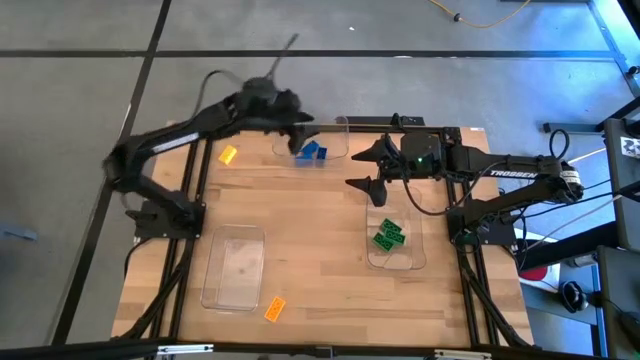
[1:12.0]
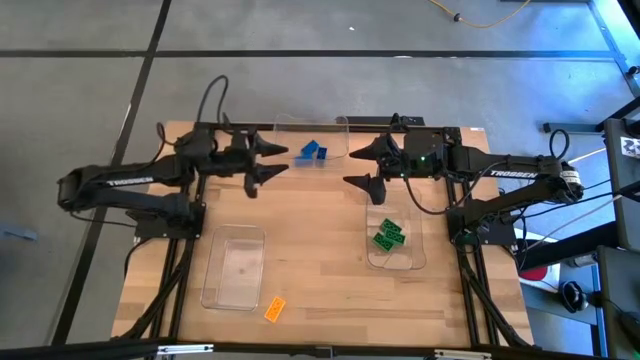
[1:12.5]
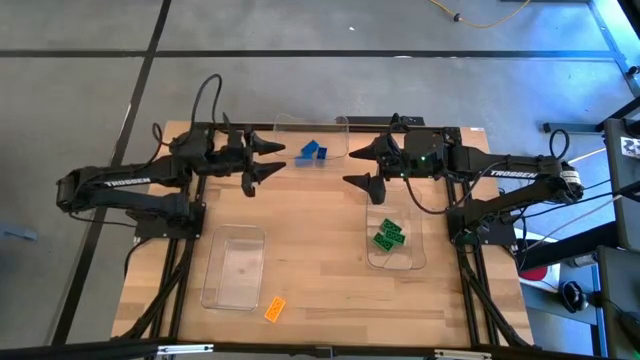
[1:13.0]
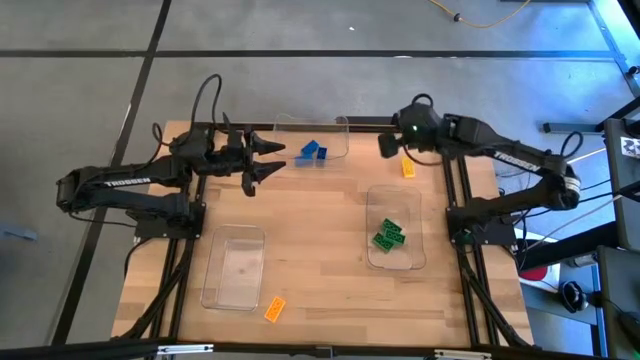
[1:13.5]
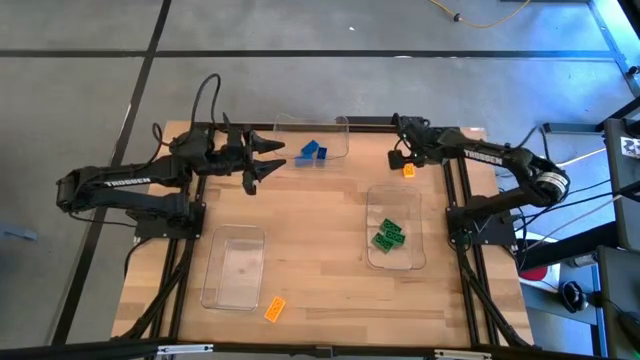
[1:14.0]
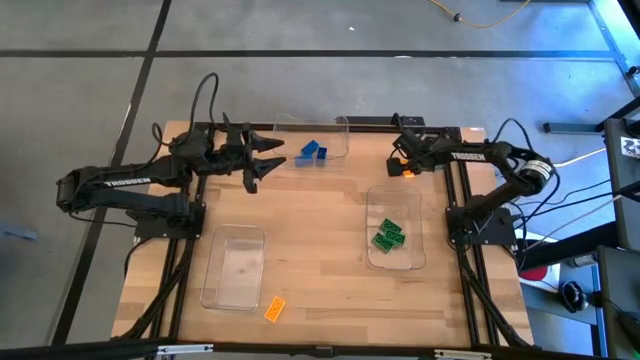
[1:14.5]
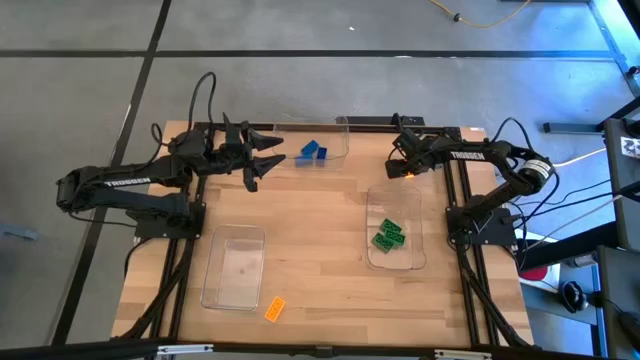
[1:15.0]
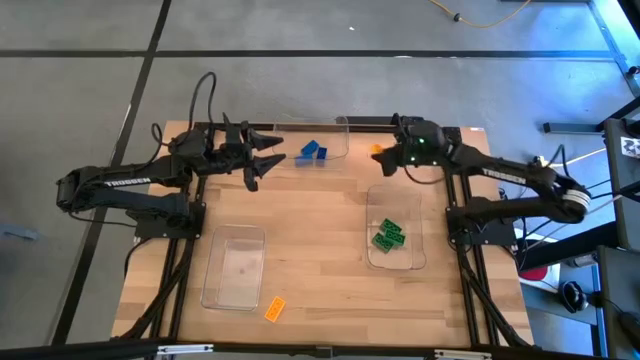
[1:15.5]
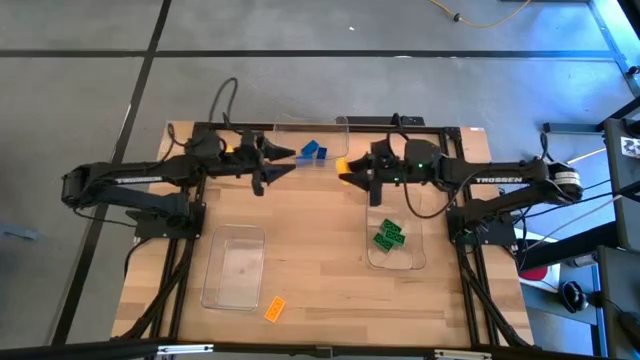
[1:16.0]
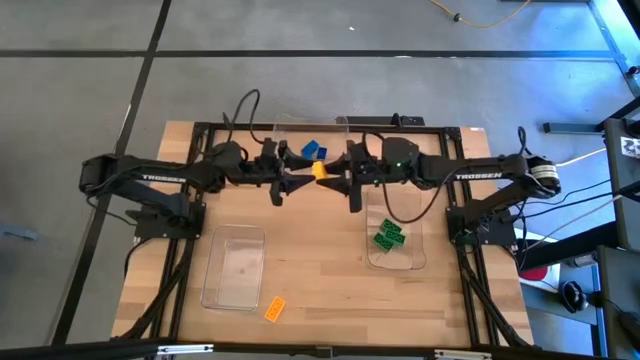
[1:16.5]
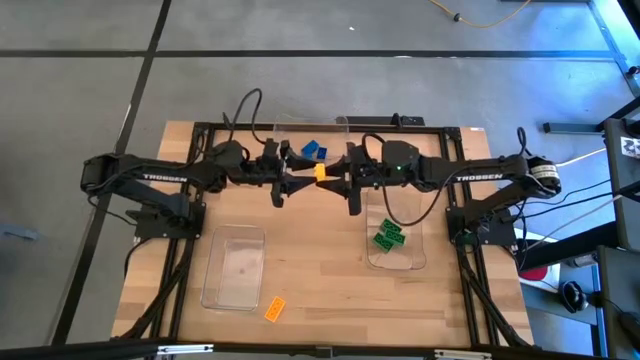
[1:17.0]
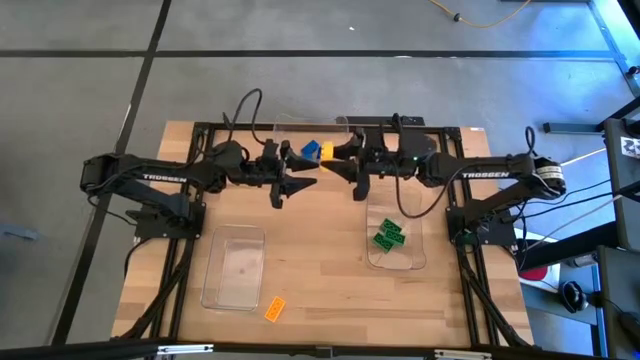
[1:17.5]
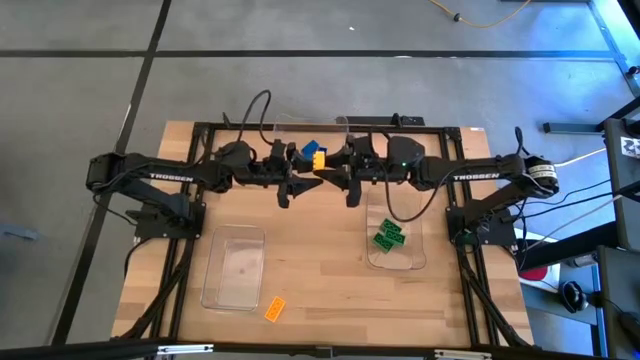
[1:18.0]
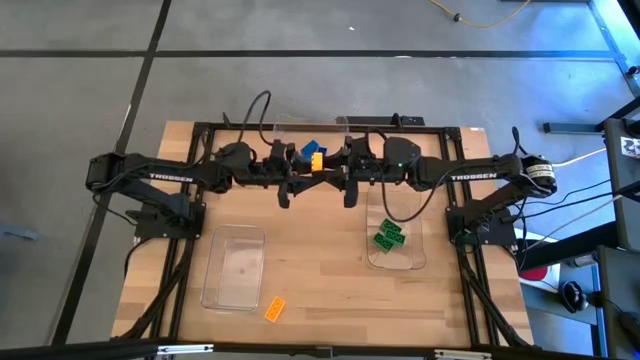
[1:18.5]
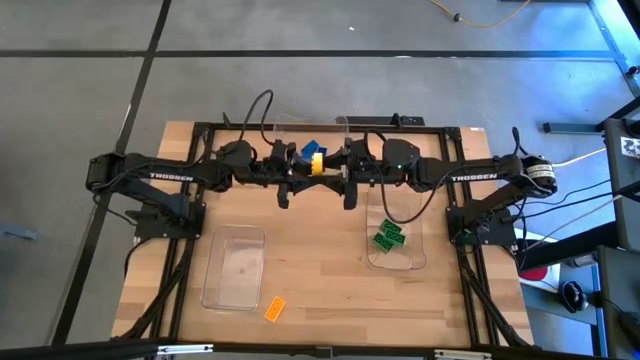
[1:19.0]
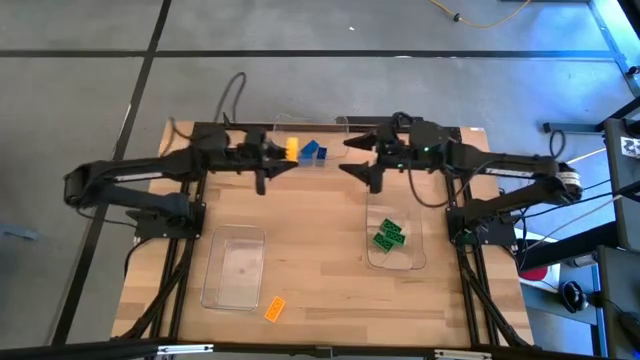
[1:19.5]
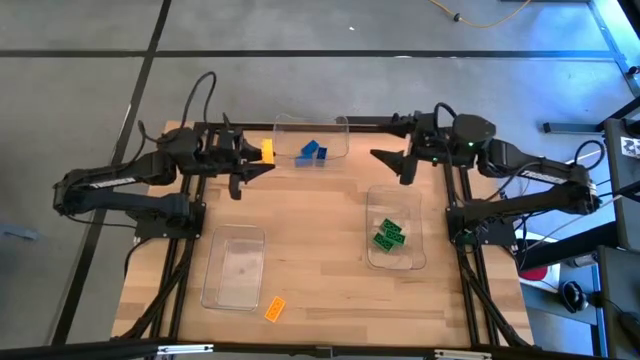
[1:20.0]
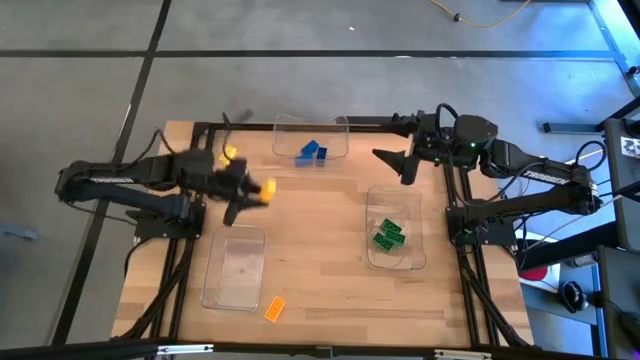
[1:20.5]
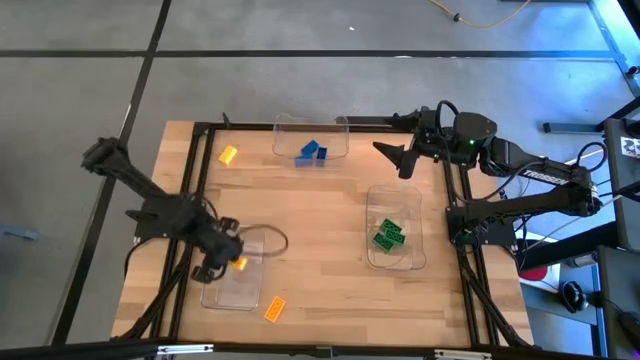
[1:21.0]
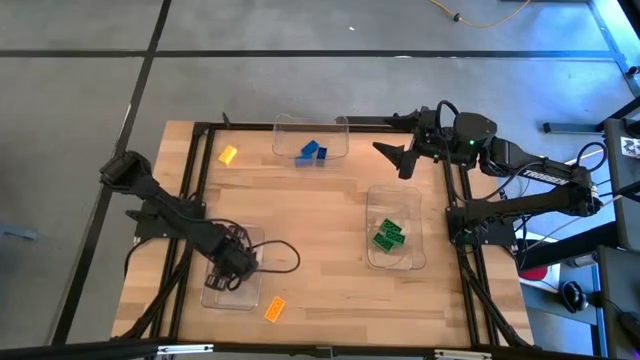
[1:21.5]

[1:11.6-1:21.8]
Task: Sort & place blocks by color
Put the top right yellow block into the bottom left transparent bin

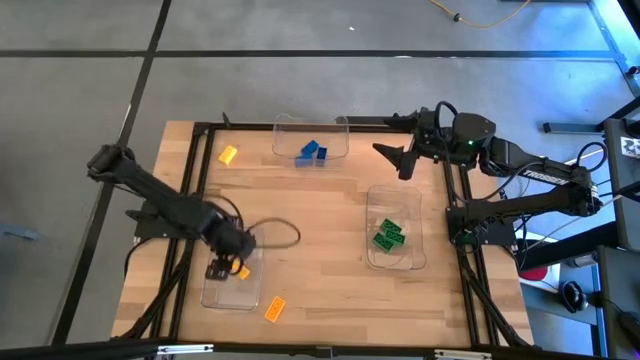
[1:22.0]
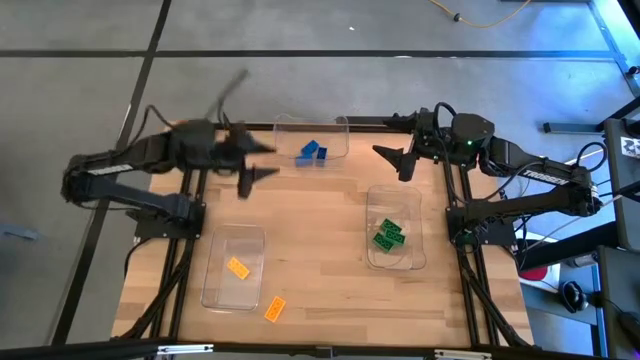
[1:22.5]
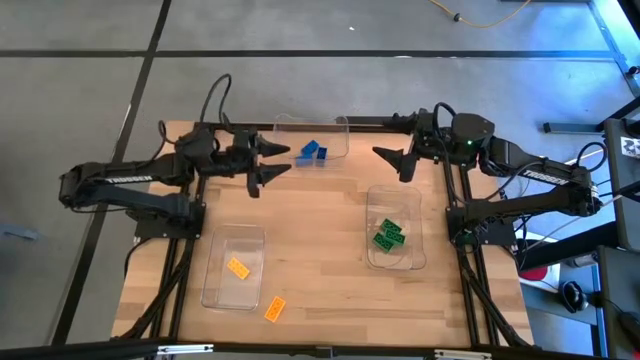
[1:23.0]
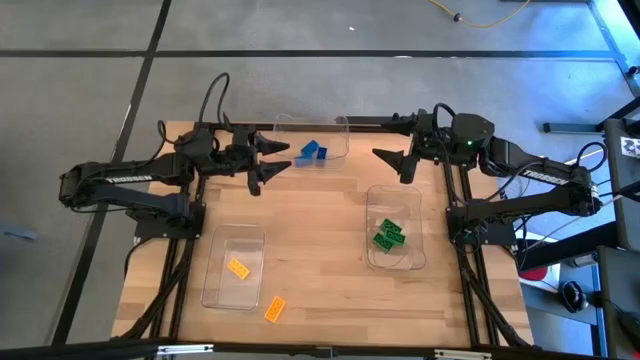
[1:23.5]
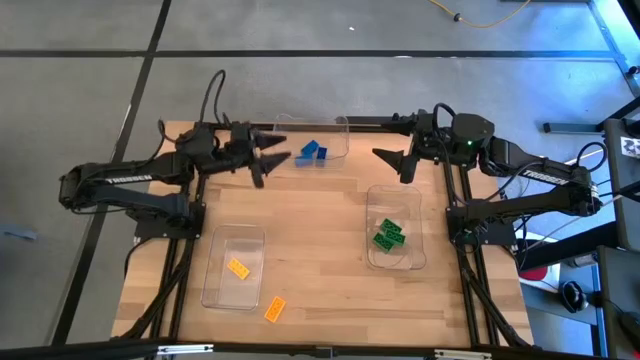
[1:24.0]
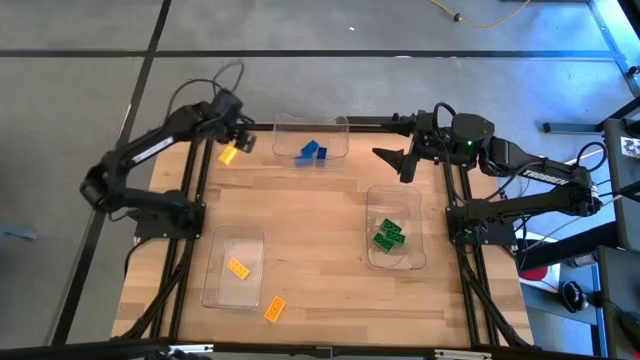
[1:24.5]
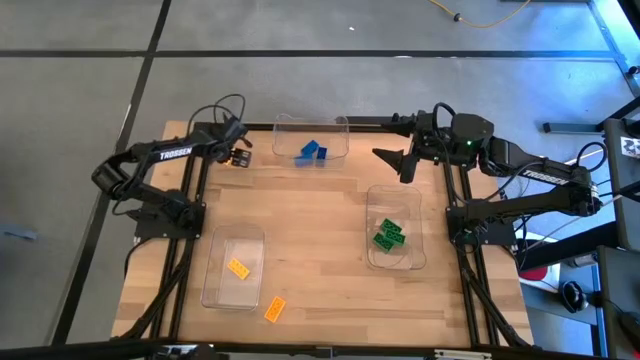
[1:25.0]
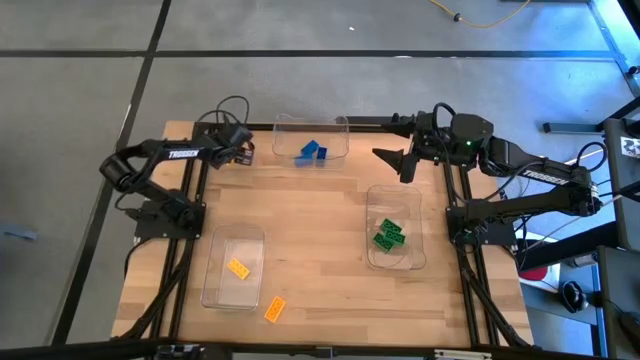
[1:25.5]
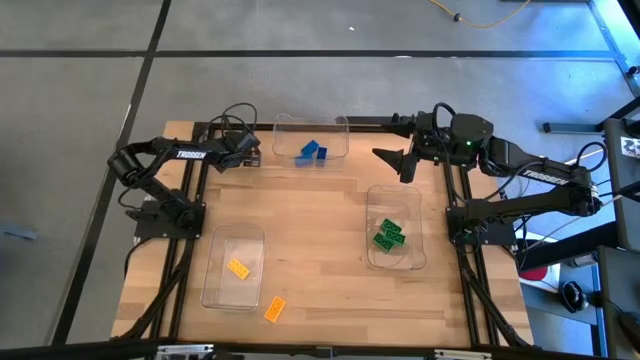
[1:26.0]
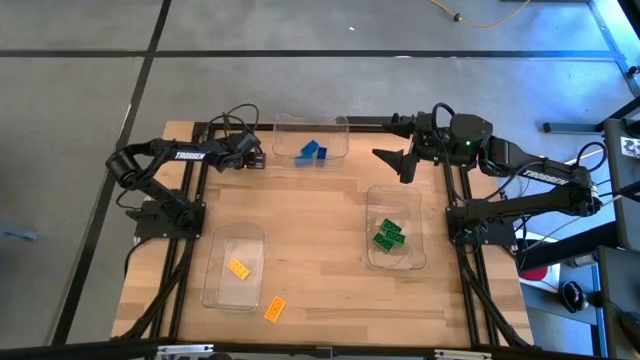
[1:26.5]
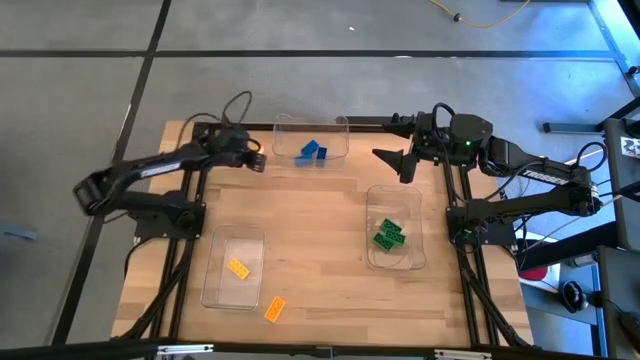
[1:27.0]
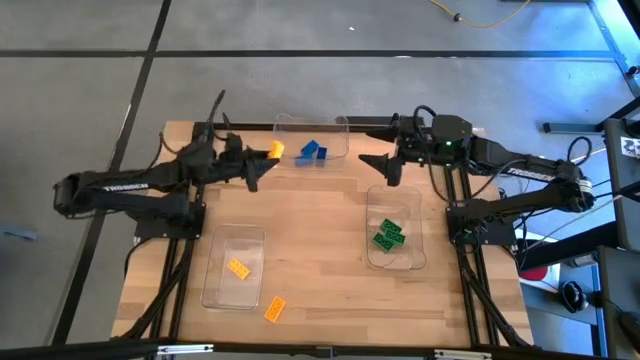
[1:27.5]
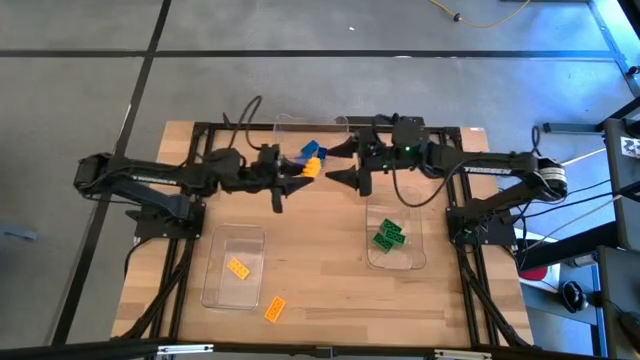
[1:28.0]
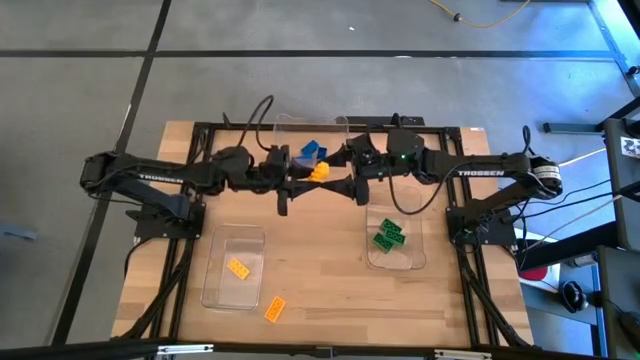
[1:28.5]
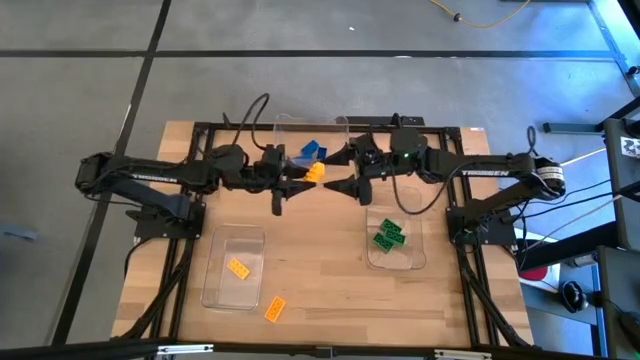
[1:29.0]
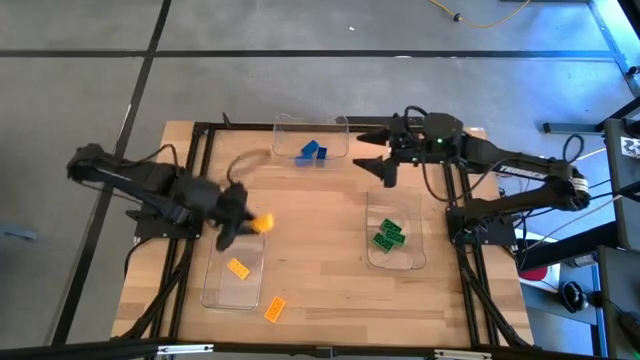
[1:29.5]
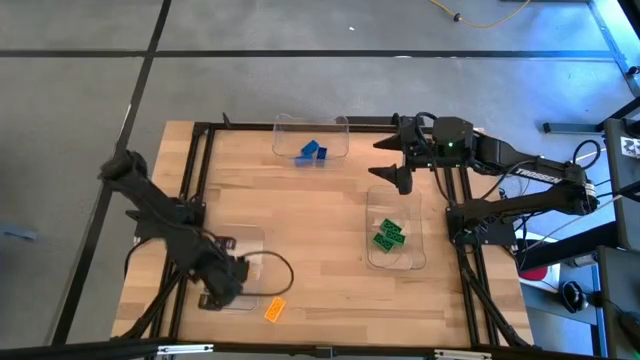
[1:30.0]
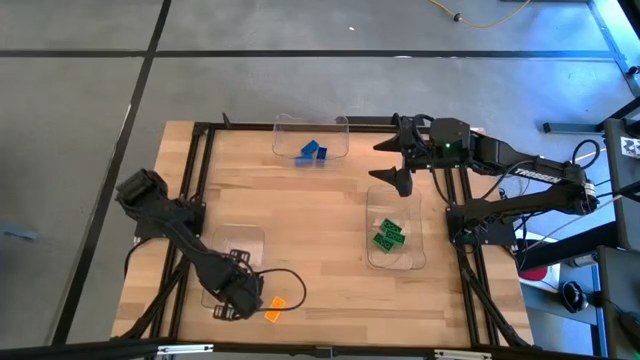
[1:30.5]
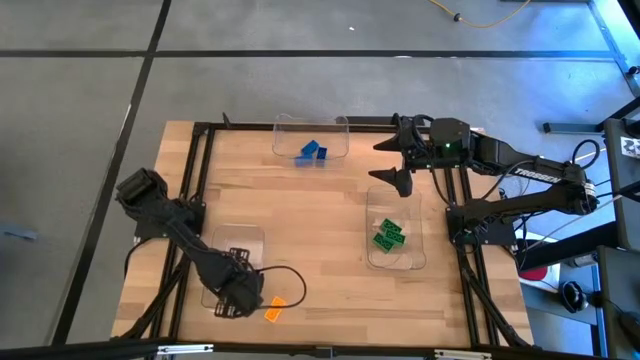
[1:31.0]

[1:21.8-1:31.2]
Put the top yellow block into the bottom left transparent bin

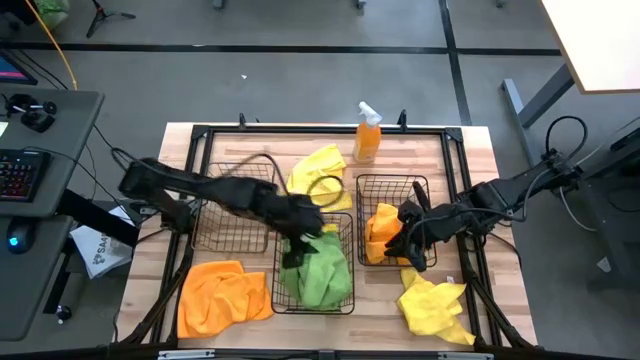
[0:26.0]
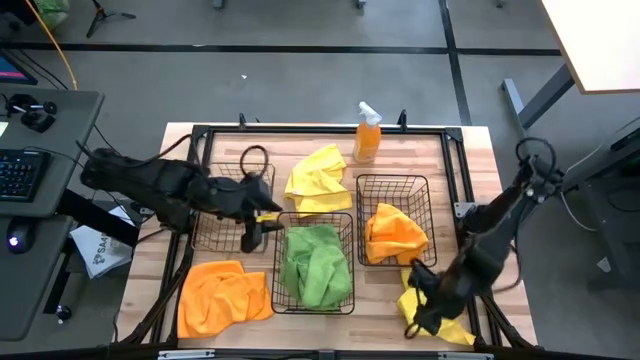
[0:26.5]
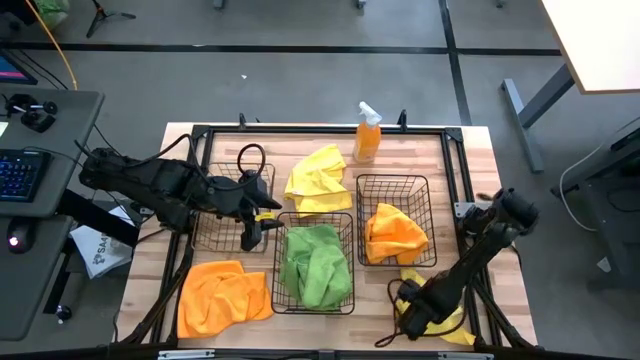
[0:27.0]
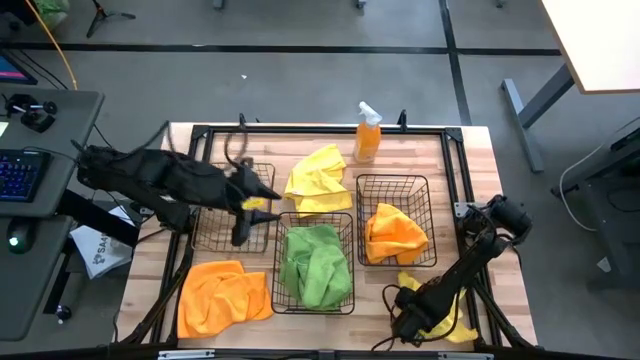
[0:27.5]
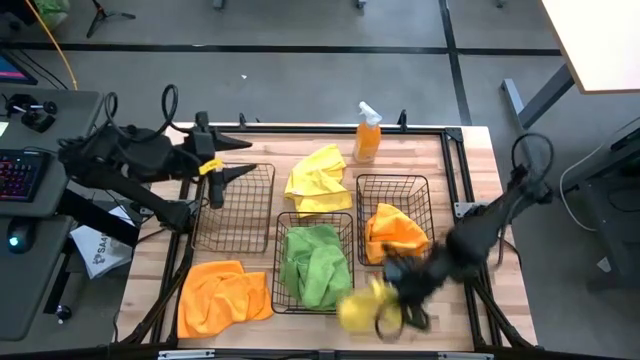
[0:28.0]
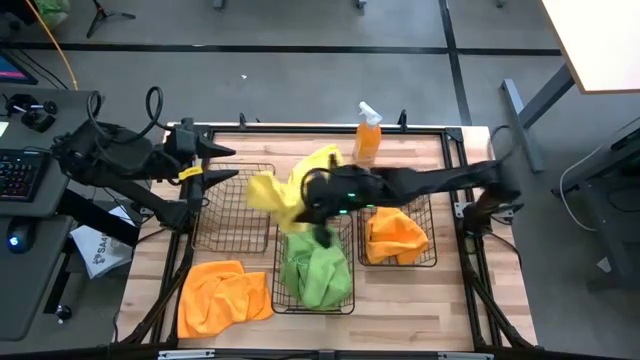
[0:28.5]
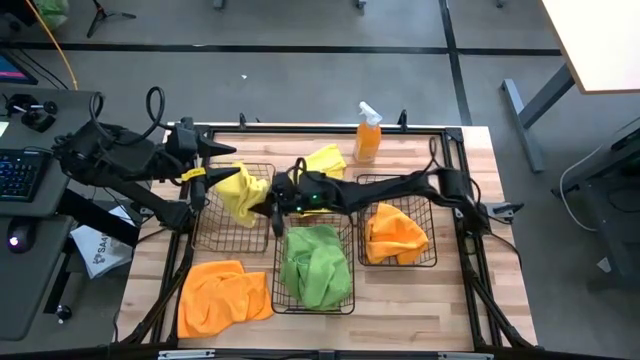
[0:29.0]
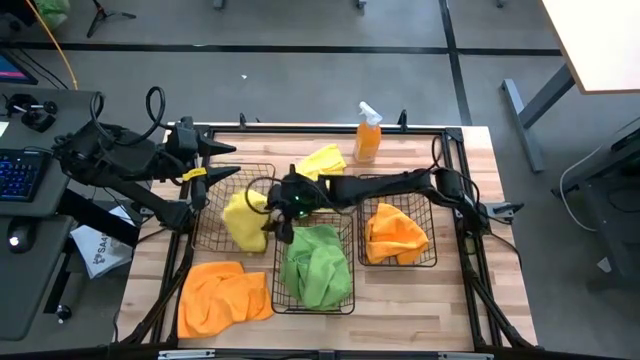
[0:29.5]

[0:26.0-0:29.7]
Task: Sort microfiber towel by color & place in baskets
Put the bottom yellow towel into the left wire basket
